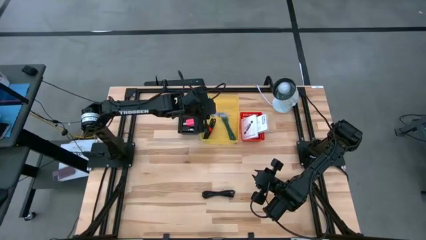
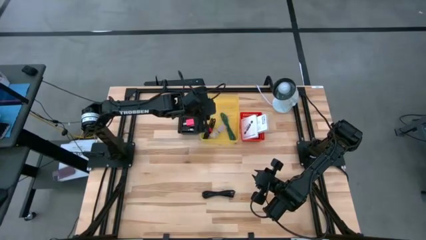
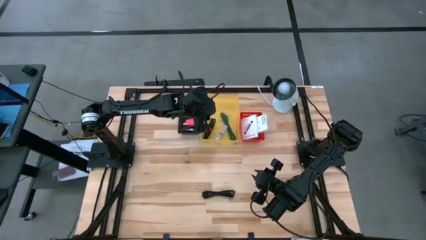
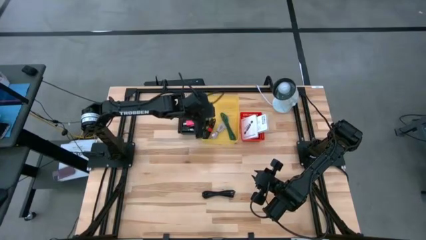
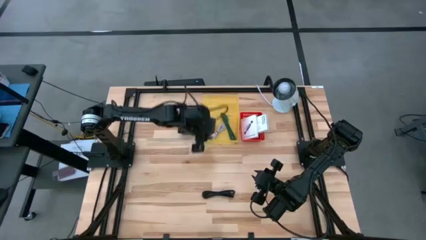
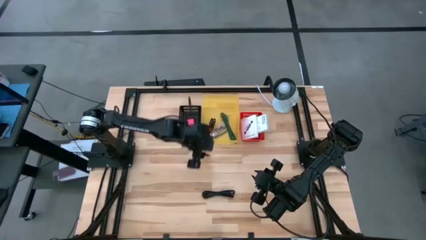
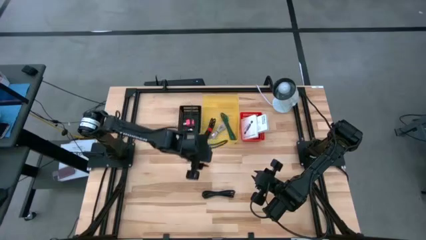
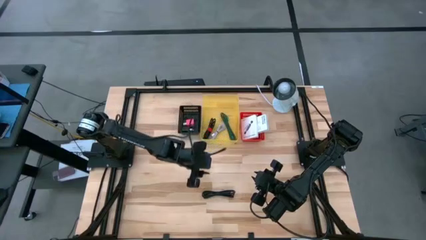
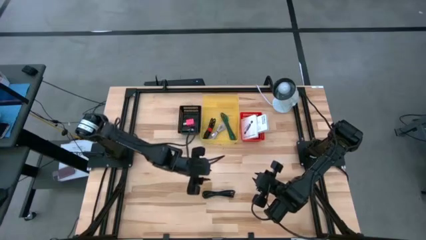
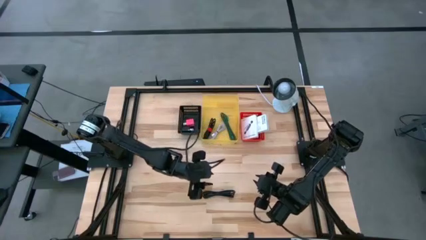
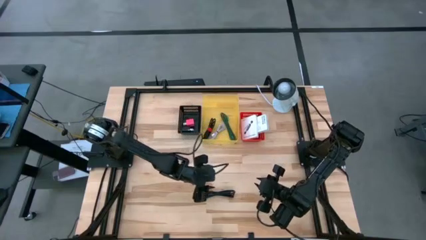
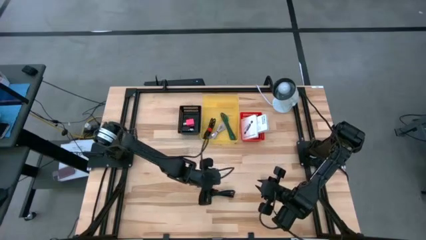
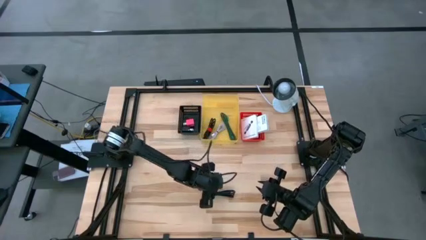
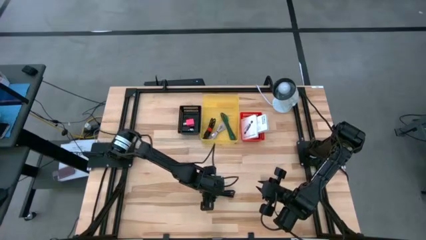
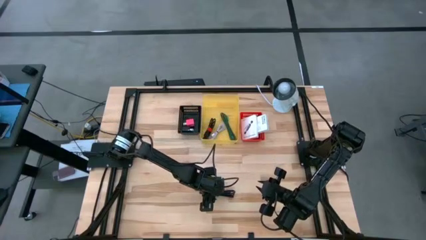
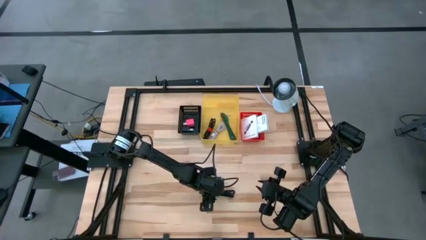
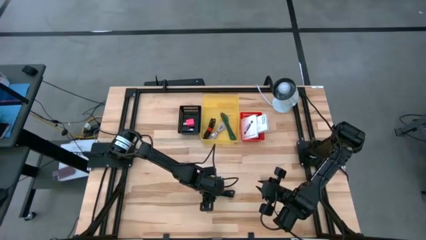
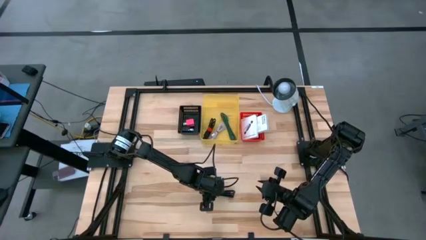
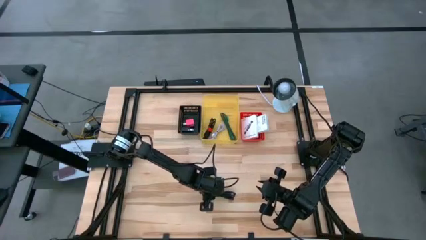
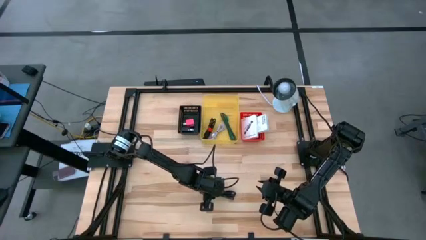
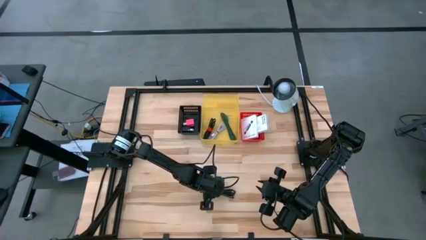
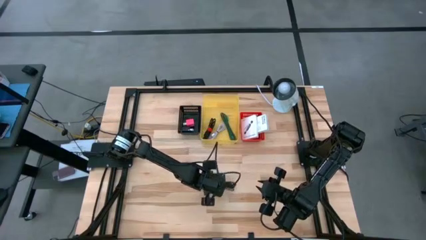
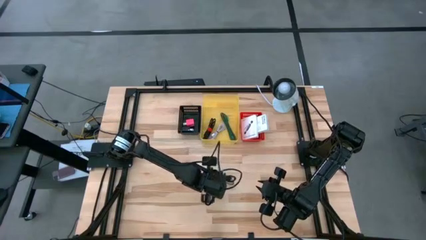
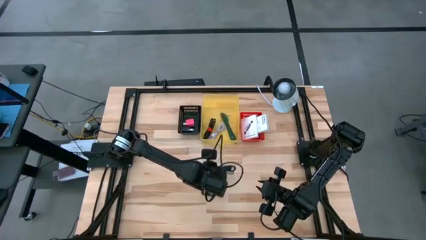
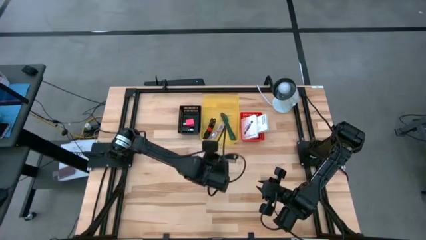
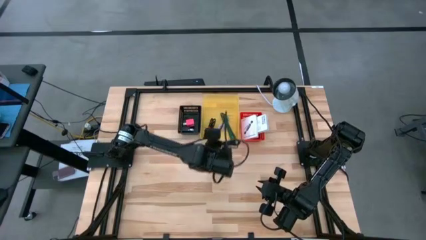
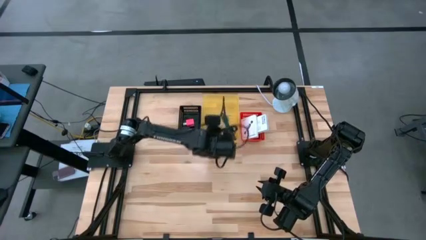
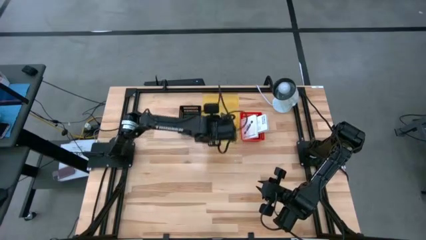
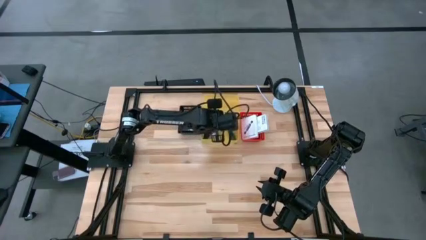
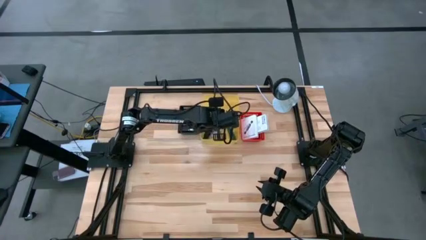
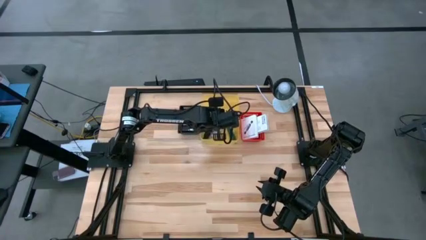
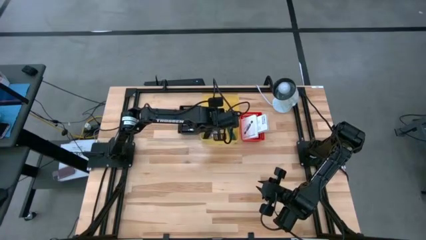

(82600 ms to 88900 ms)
Task: Pick and place items into bin
Put the black USB cable into the yellow bin

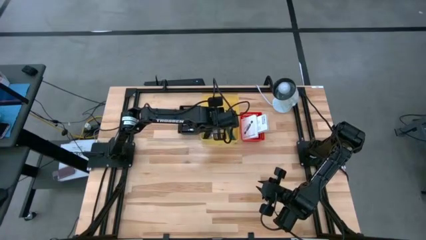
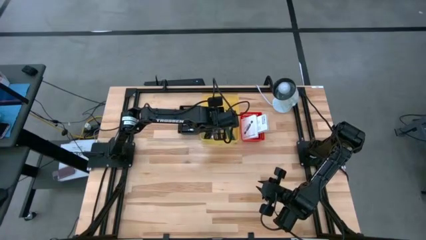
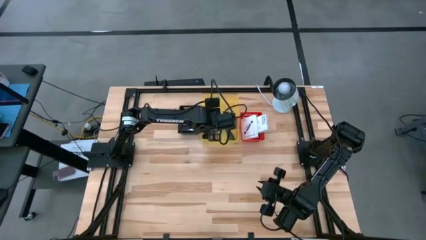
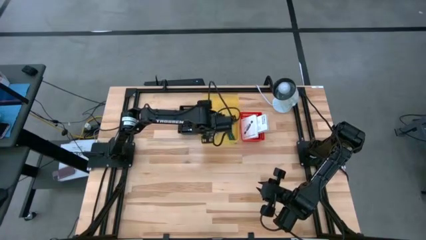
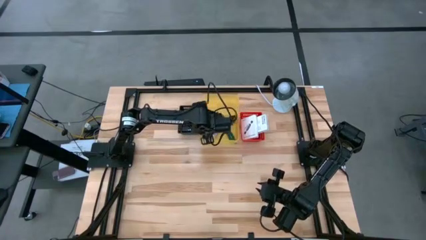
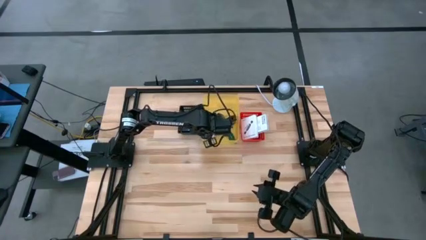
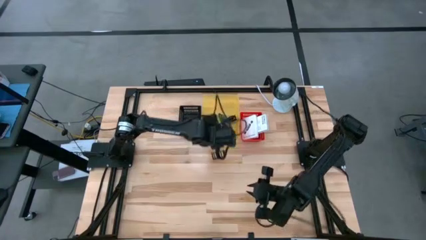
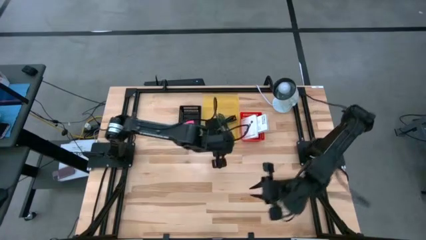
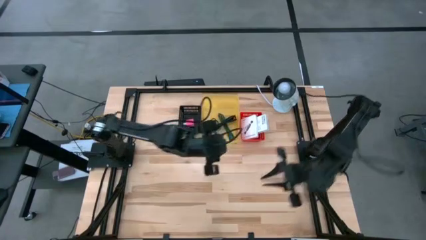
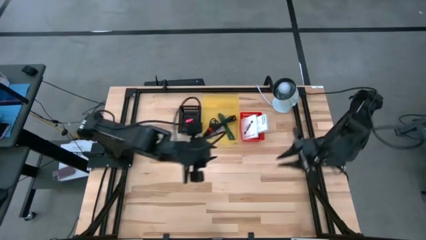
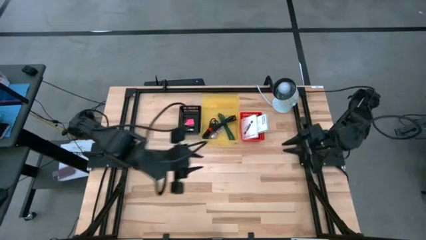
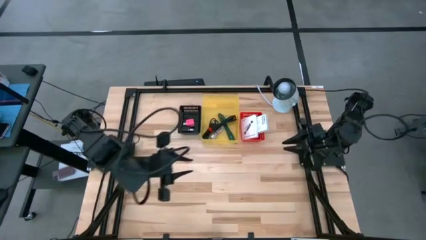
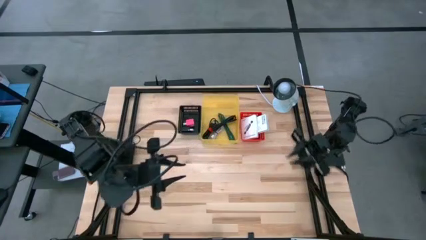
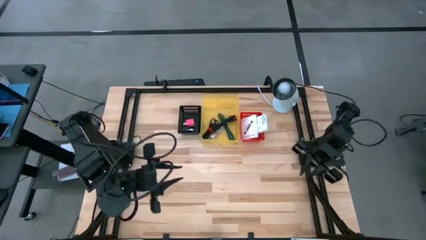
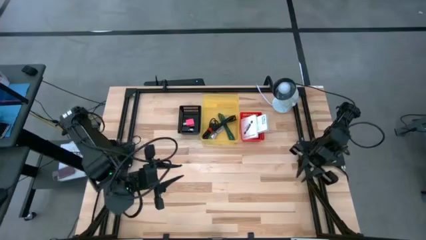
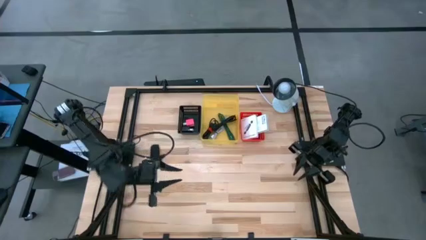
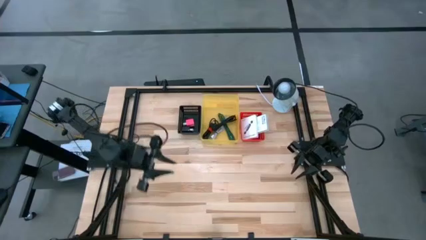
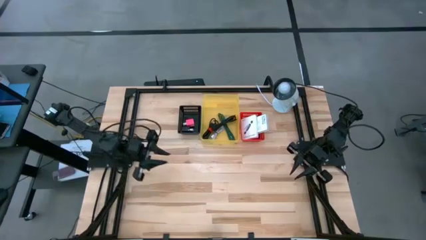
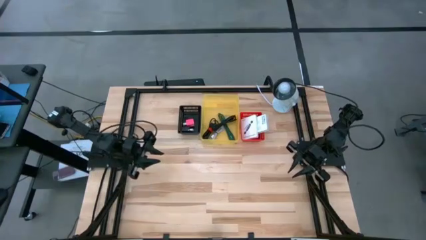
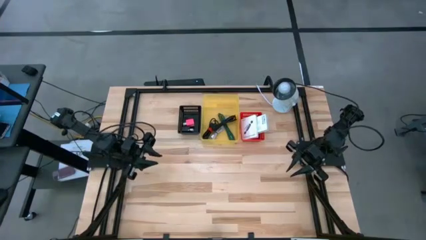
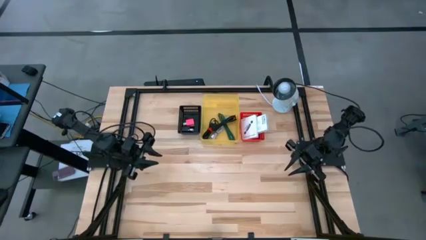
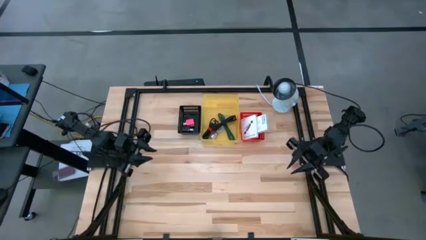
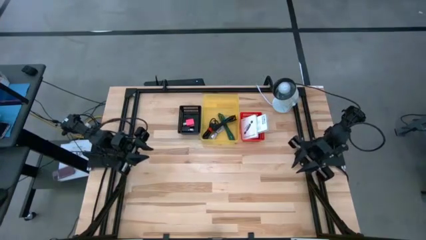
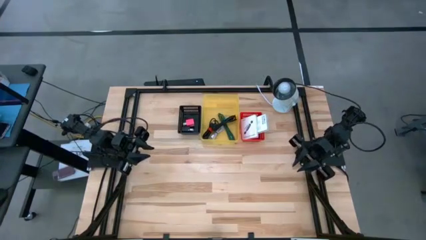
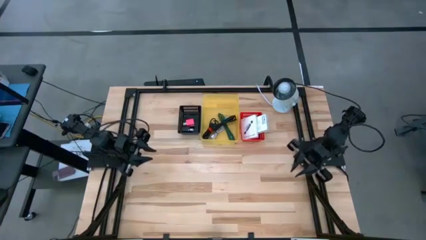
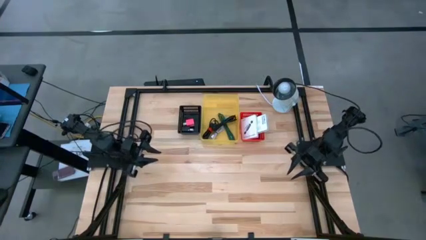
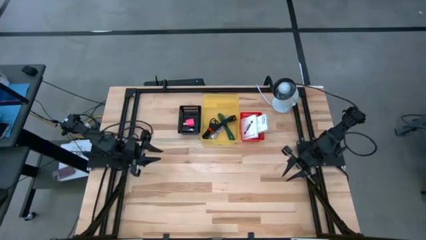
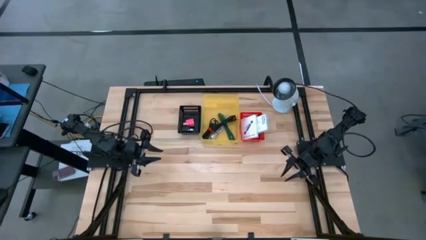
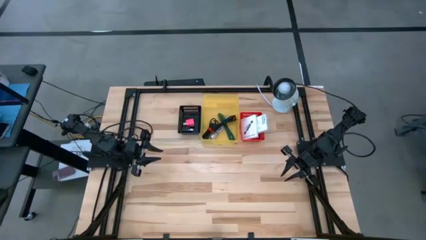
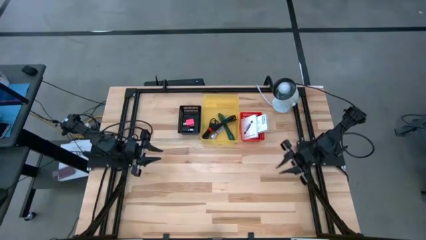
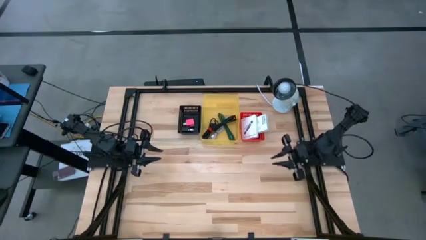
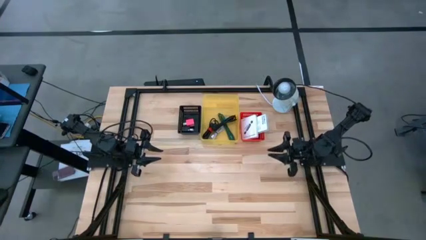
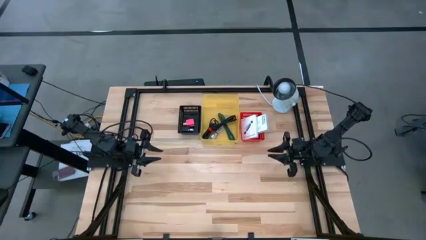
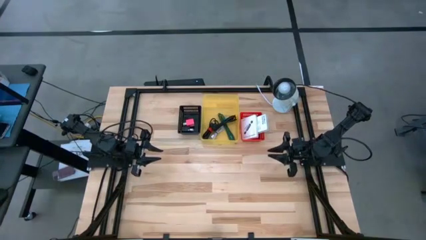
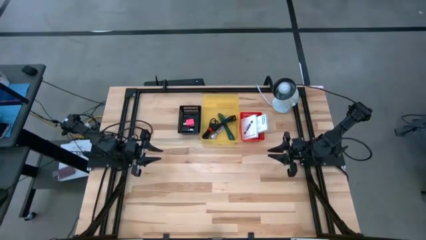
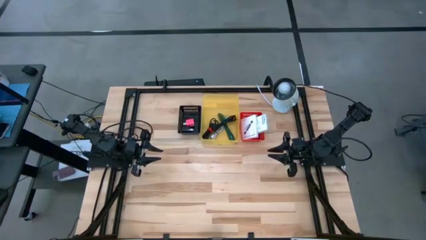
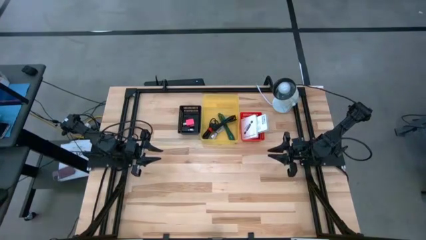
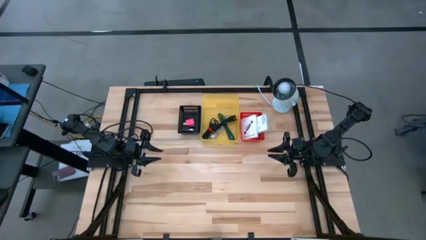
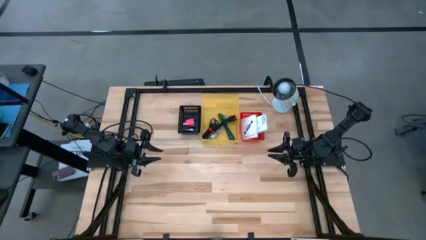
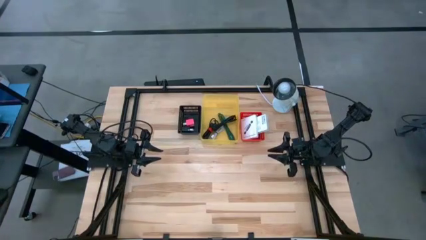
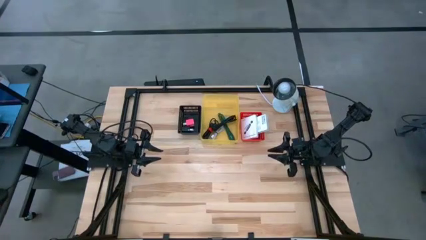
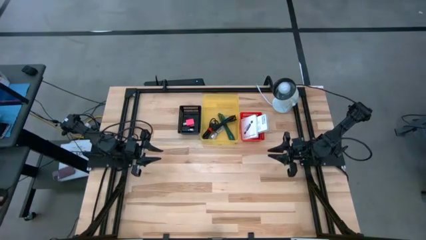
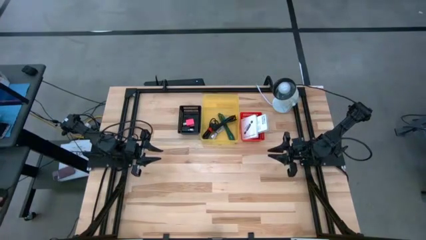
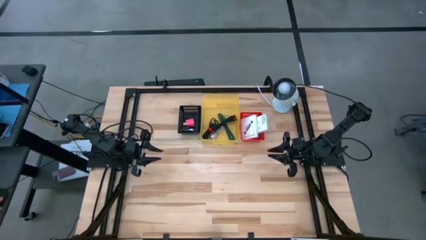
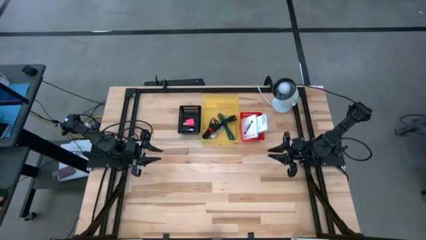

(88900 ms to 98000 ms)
Return to Home Position
